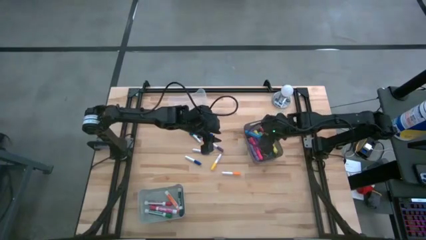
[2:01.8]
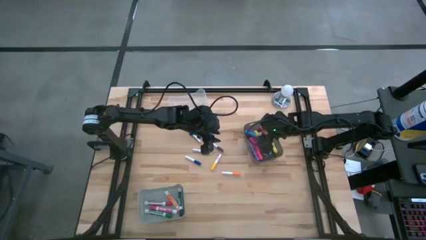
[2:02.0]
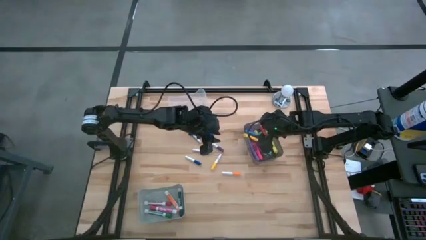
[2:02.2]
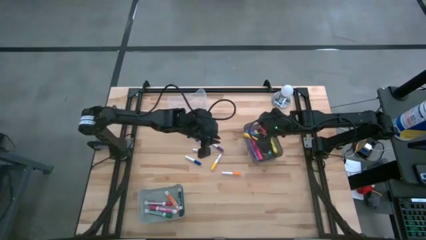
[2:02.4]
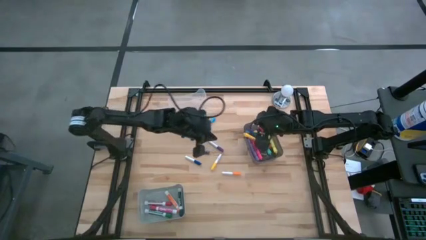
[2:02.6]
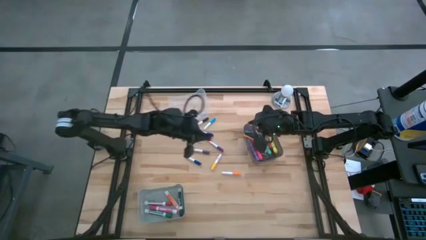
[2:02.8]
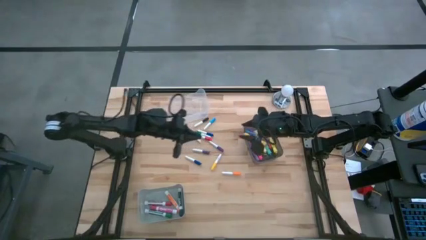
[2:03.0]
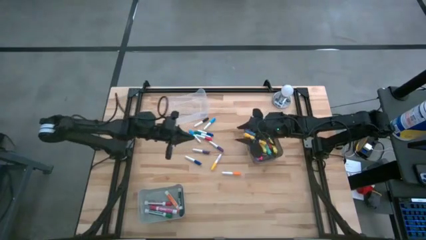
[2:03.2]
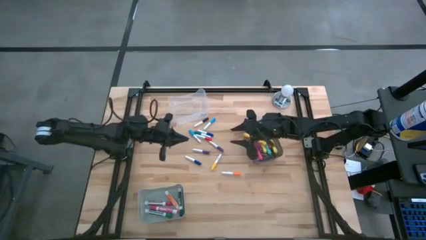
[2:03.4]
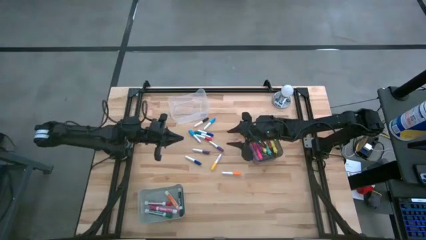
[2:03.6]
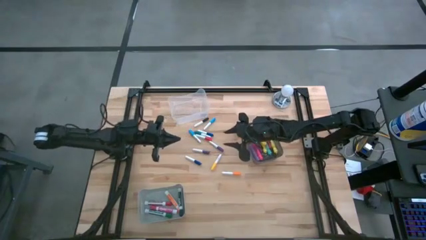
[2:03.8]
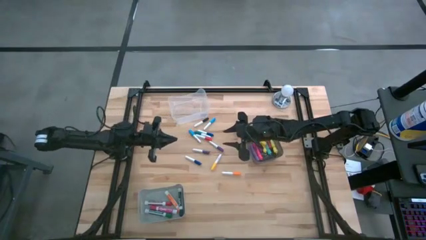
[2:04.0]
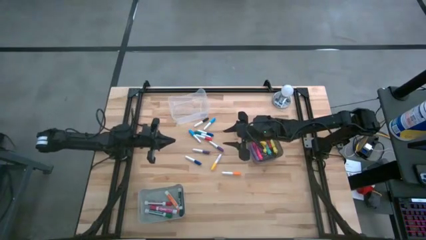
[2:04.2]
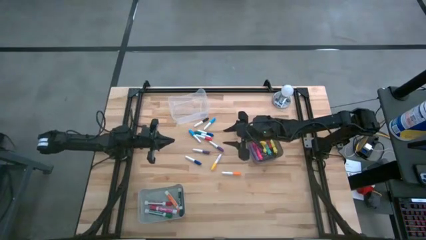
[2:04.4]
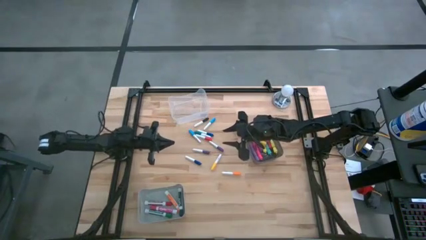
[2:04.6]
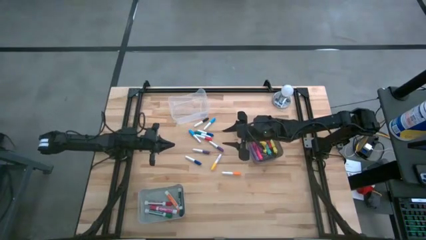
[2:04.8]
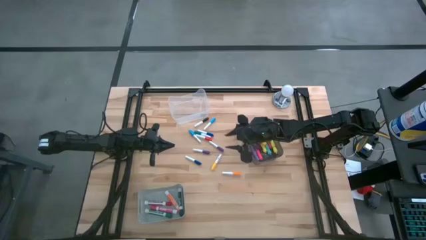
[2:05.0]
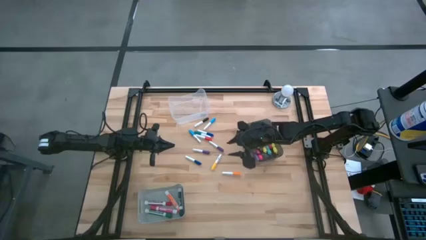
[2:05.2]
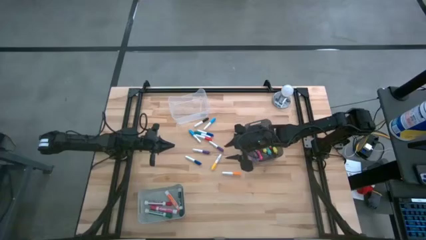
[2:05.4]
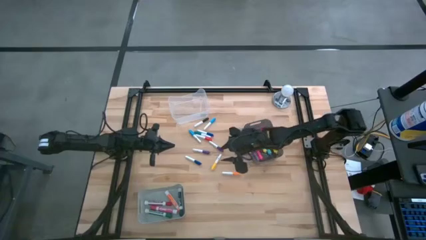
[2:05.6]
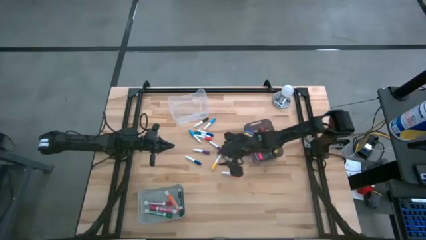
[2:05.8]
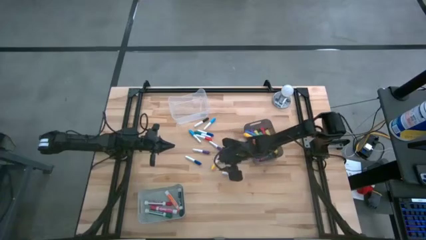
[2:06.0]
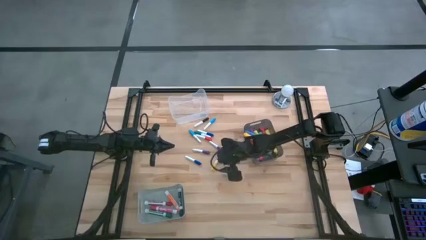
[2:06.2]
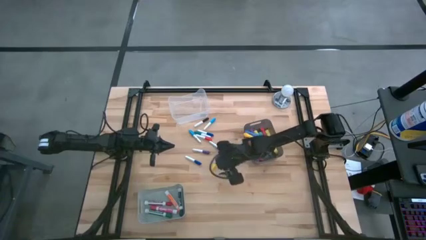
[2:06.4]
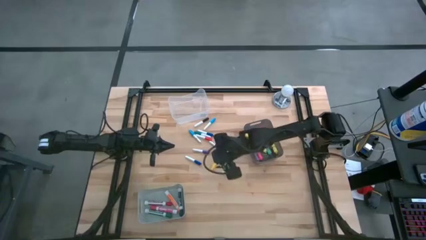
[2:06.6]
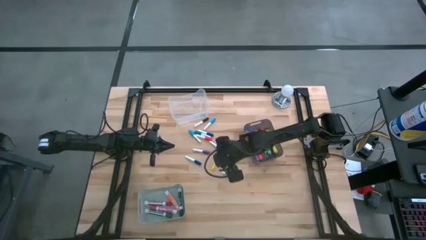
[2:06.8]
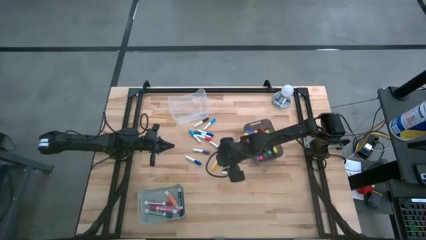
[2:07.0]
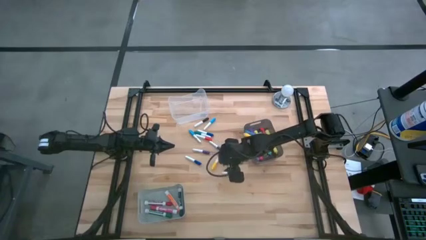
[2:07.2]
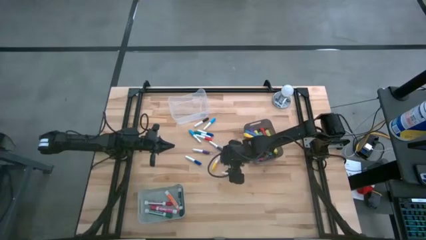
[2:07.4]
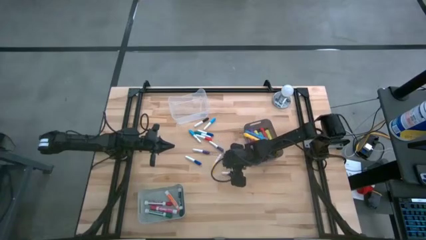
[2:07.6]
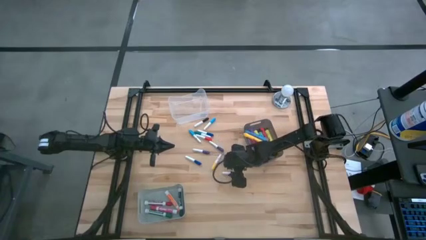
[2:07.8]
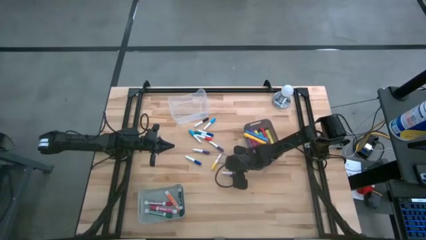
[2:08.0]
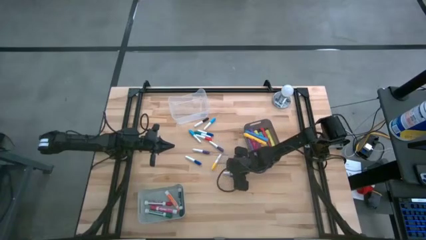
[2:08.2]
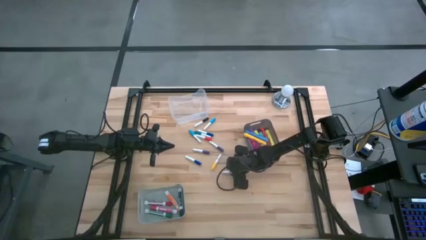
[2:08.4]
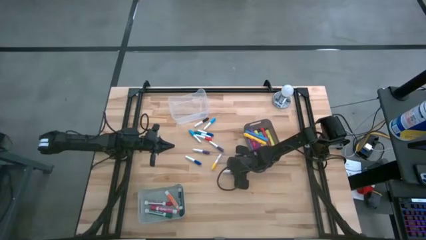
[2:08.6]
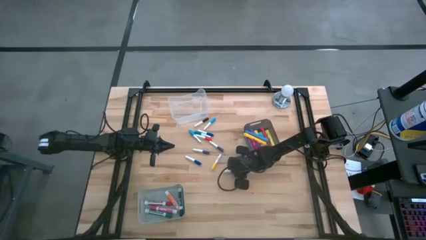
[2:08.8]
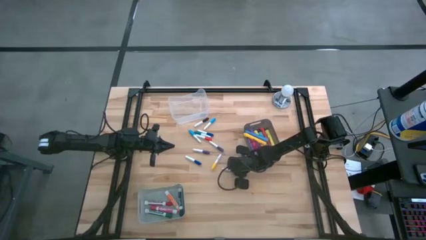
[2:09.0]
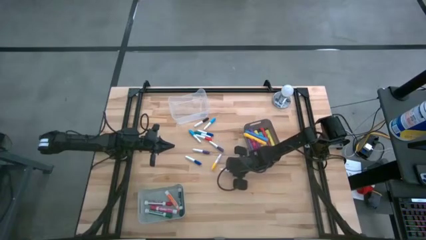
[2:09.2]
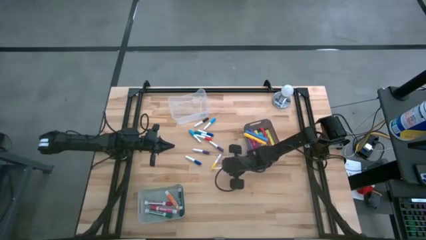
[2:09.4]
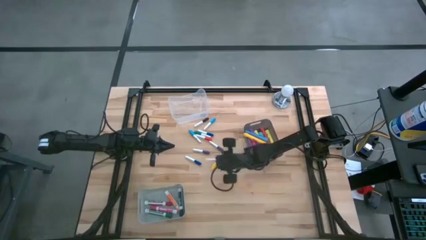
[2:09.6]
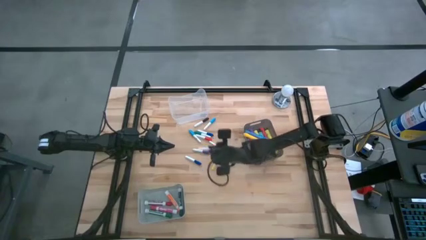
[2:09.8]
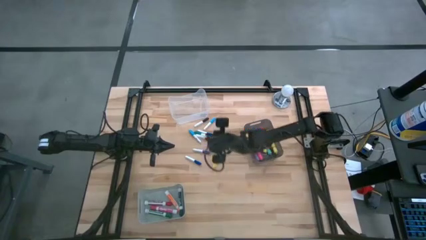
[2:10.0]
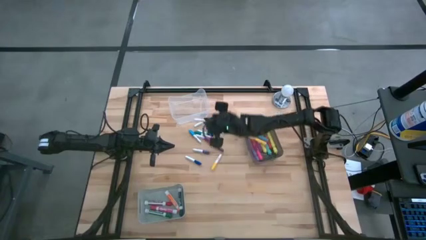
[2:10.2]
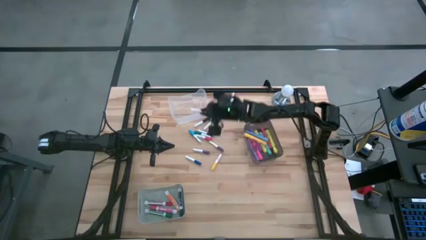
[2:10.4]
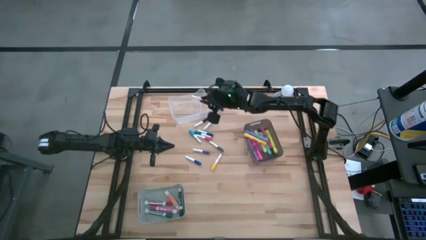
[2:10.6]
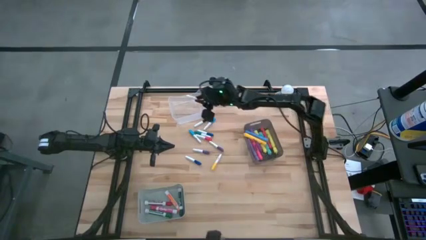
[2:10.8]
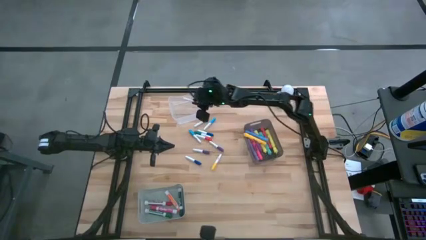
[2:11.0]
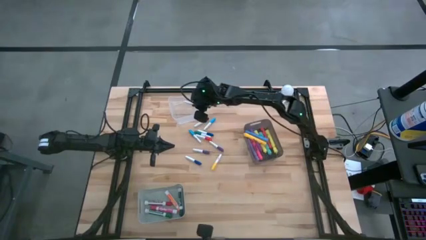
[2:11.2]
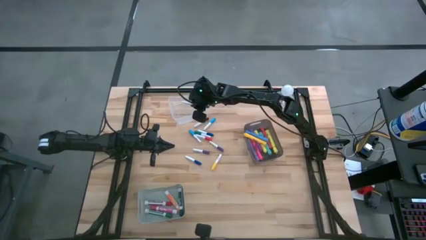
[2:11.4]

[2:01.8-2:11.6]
Task: Pick & Place Markers
Put the white and orange highlighter pen into the transparent bin

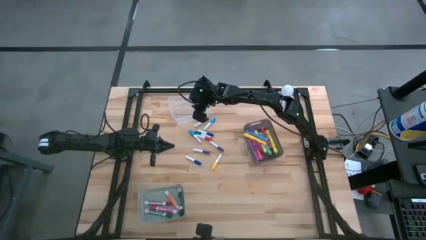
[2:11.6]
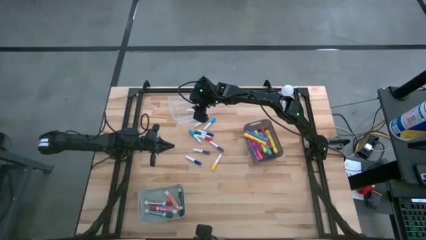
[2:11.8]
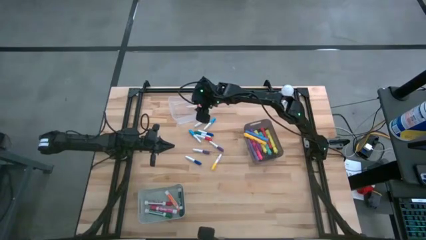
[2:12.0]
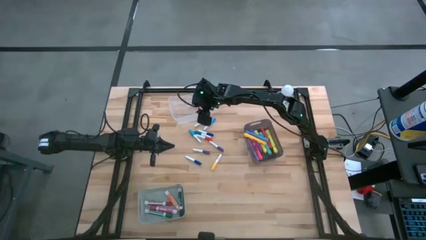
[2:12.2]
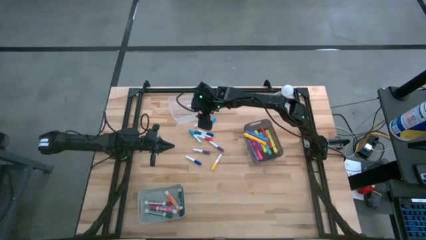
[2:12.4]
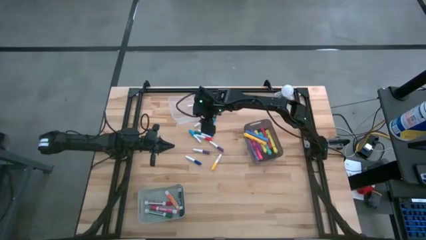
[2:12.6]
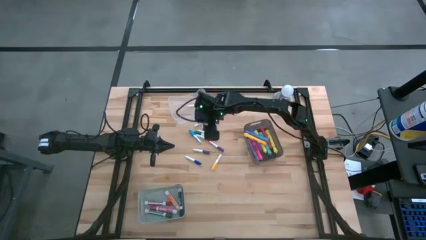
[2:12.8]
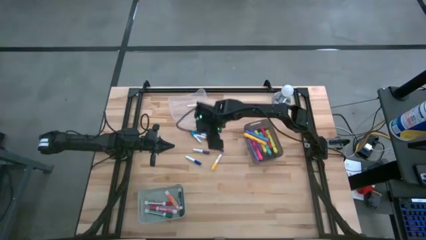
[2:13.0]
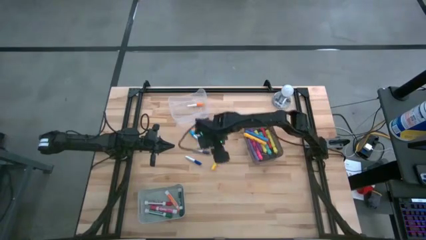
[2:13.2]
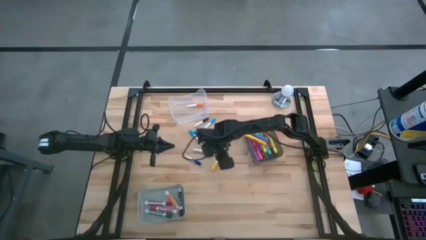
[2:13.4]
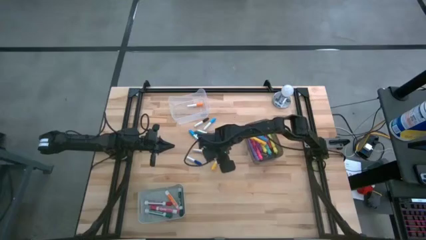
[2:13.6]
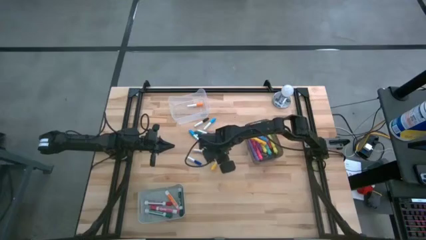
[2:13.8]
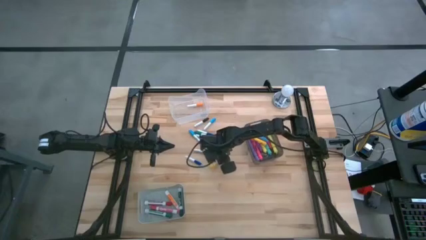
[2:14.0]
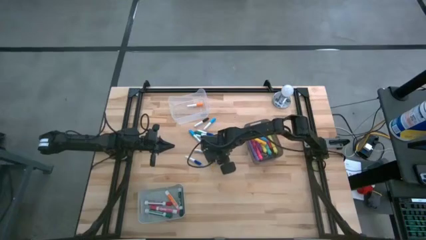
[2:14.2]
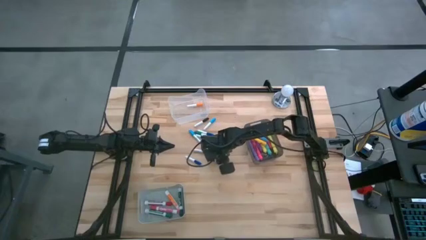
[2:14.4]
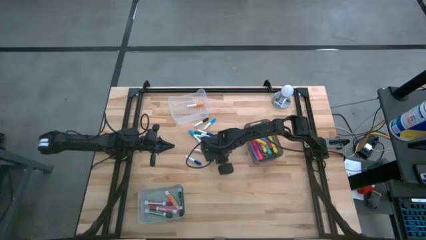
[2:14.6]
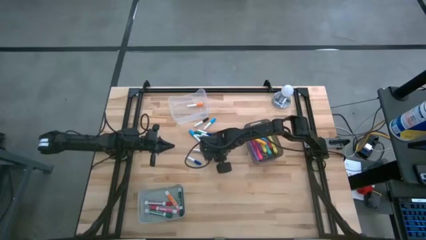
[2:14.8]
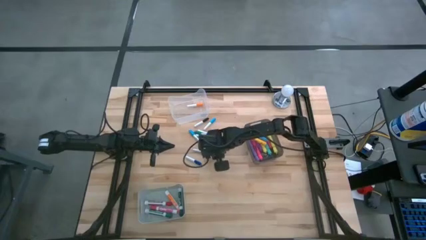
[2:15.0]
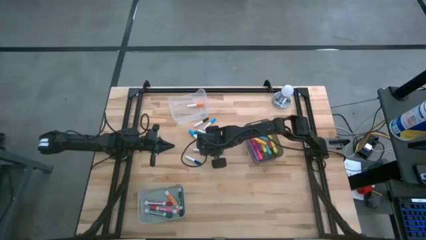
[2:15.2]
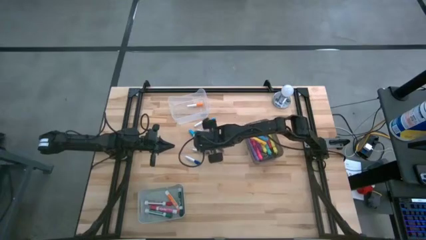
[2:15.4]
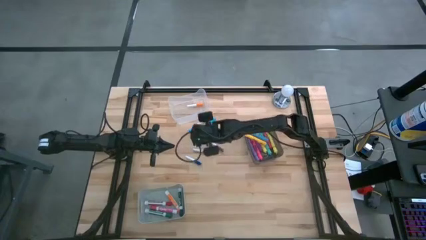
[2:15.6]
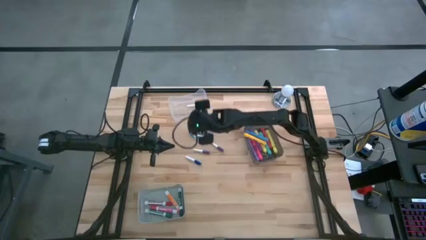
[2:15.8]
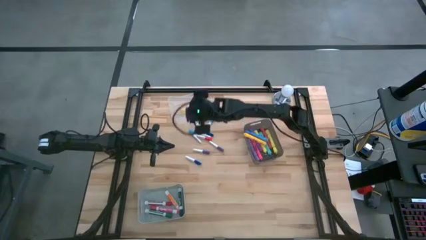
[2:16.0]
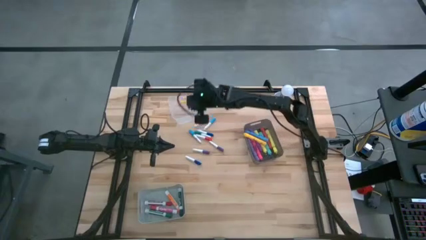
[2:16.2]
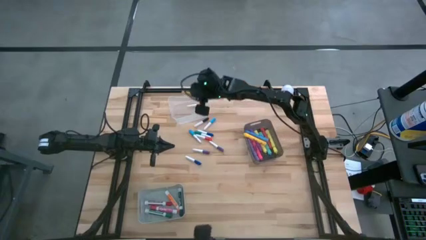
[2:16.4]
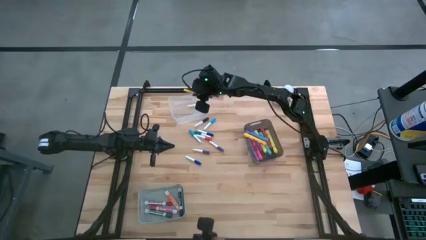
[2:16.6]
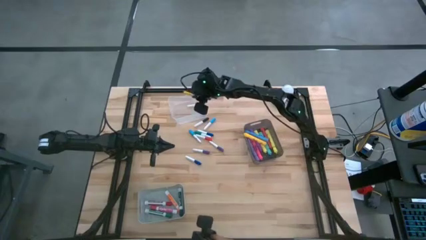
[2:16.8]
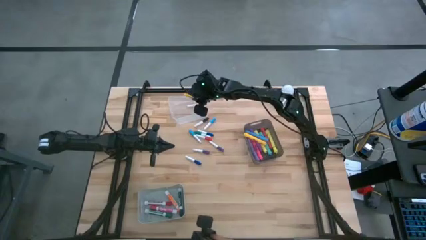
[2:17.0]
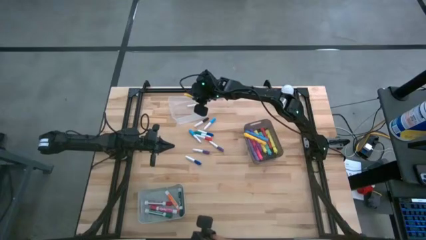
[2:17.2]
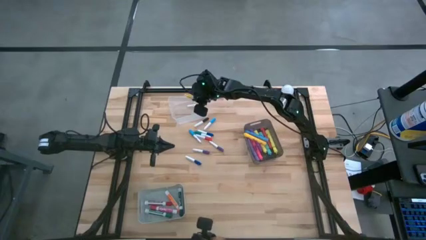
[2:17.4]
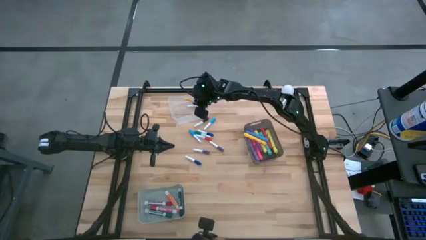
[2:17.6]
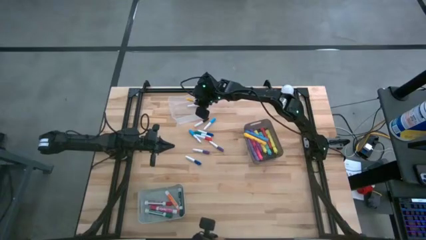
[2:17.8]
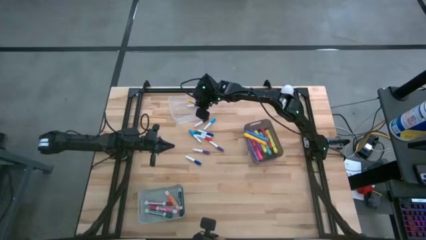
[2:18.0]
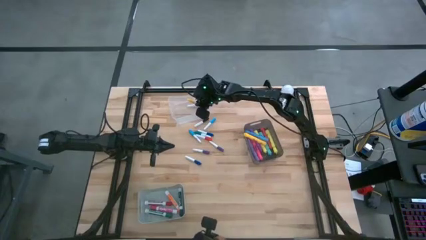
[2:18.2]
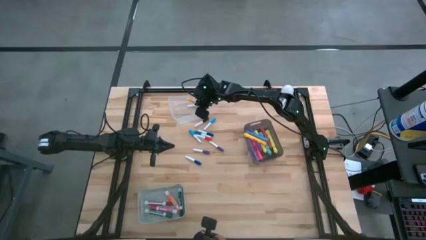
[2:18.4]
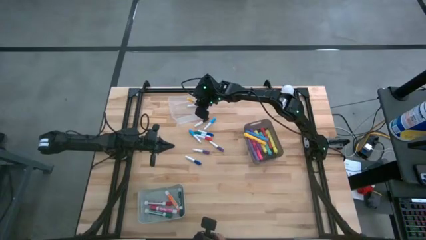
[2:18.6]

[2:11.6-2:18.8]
Put the white and yellow highlighter pen into the transparent bin

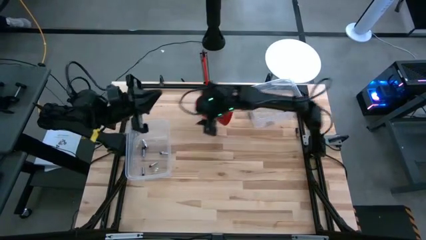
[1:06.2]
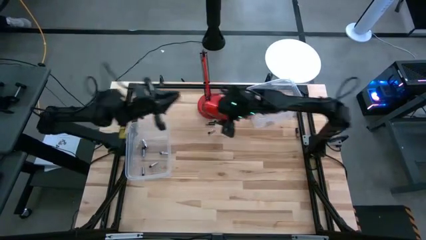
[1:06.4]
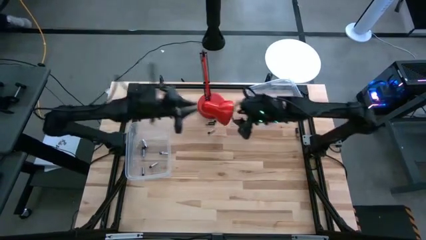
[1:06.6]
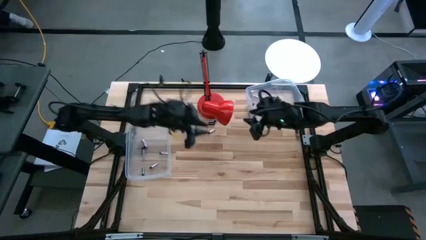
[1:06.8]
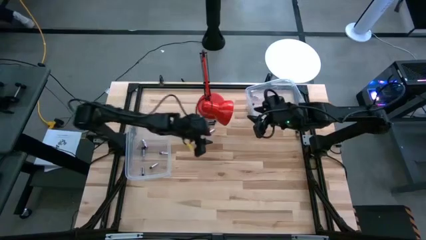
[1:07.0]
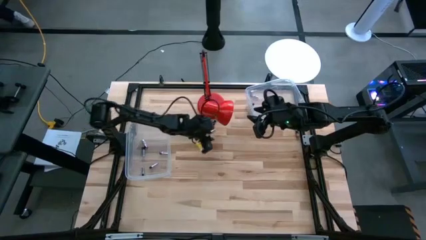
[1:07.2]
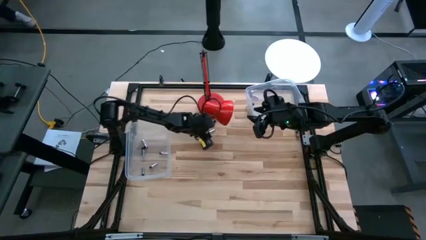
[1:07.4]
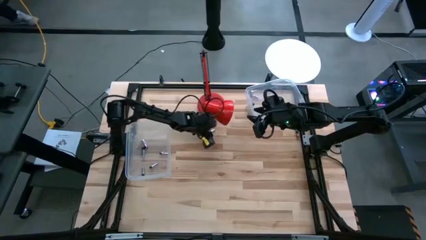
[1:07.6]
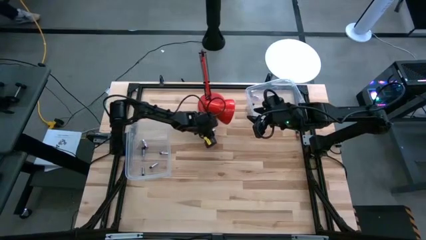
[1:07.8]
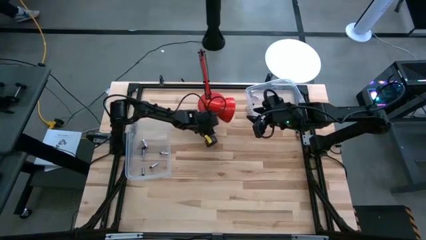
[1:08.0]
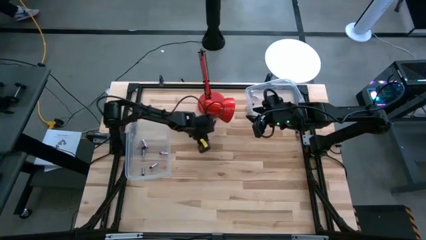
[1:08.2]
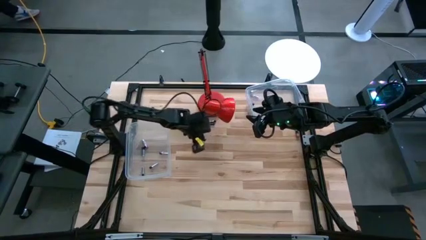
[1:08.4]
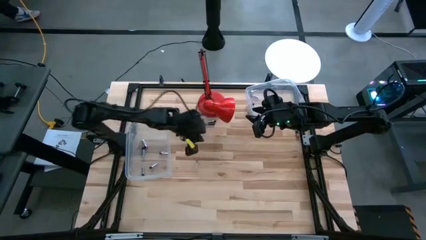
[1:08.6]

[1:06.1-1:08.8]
Task: Sort batteries
Put the silver battery into the bottom transparent bin
